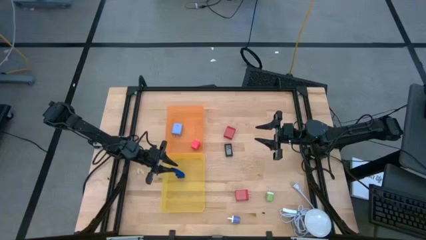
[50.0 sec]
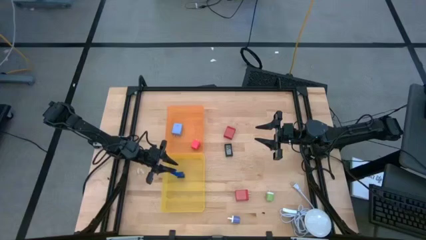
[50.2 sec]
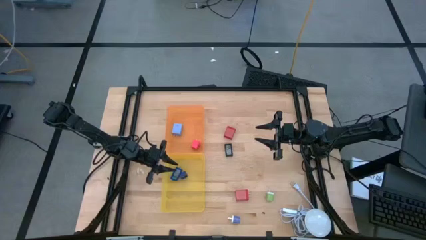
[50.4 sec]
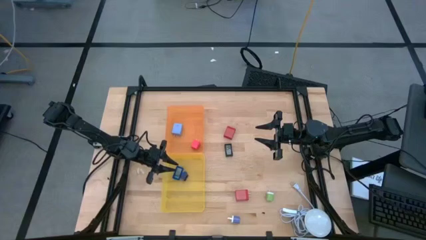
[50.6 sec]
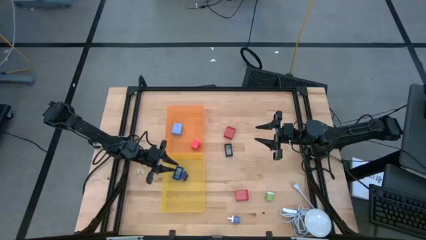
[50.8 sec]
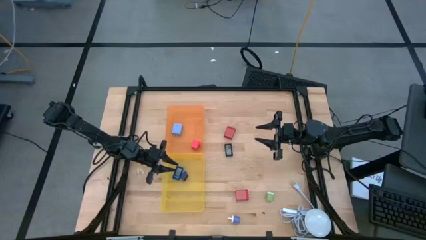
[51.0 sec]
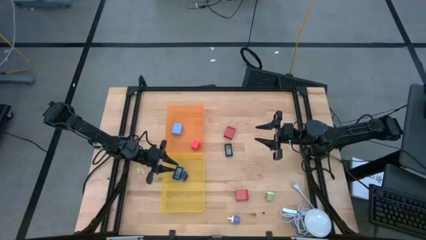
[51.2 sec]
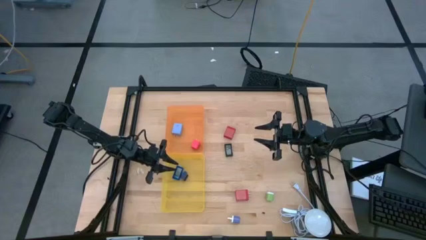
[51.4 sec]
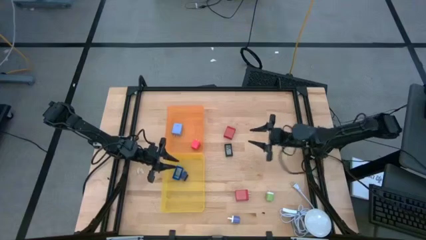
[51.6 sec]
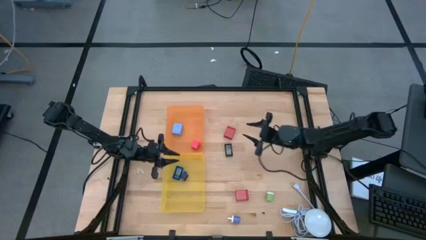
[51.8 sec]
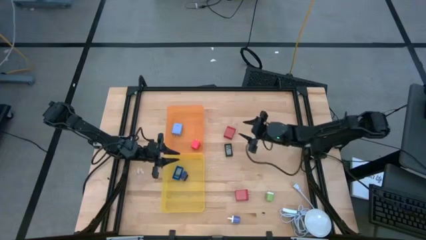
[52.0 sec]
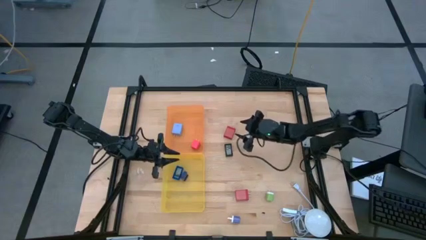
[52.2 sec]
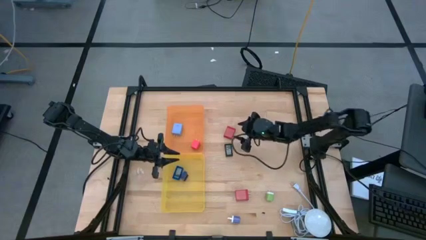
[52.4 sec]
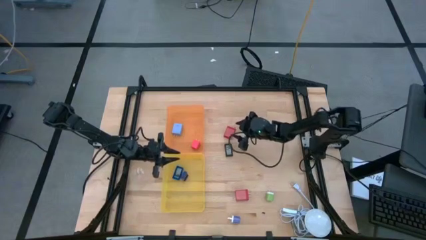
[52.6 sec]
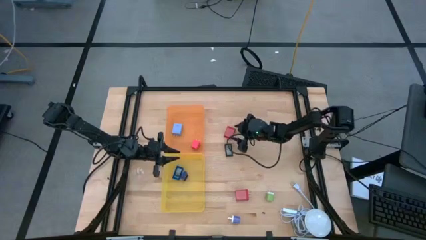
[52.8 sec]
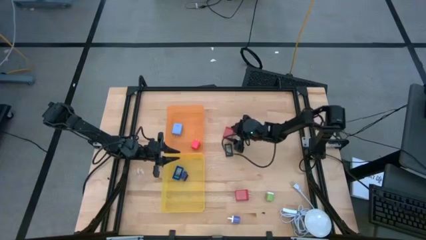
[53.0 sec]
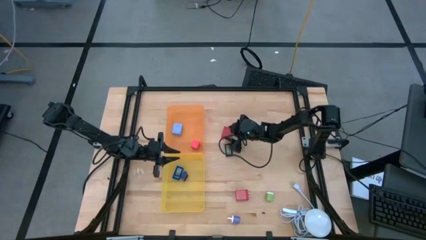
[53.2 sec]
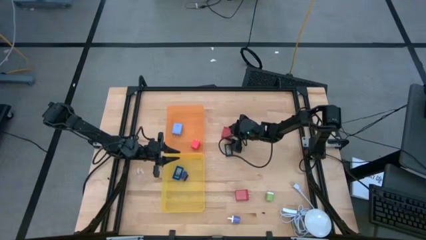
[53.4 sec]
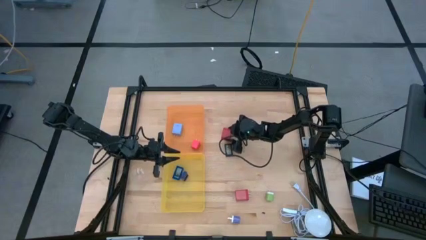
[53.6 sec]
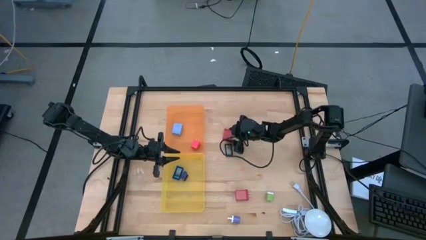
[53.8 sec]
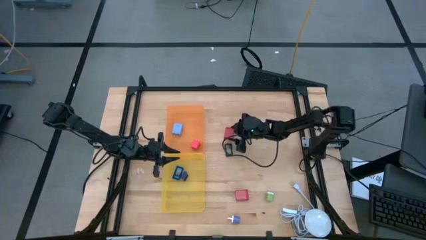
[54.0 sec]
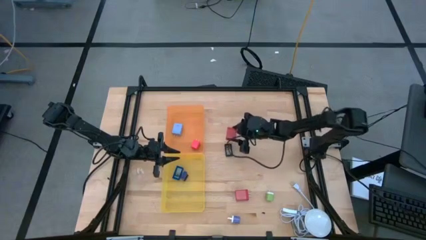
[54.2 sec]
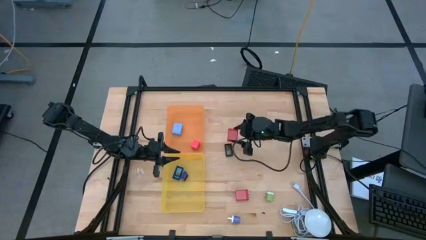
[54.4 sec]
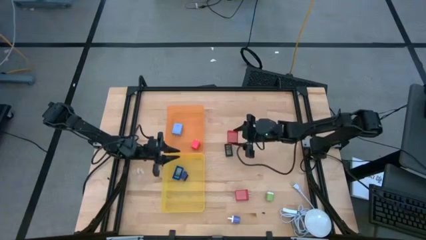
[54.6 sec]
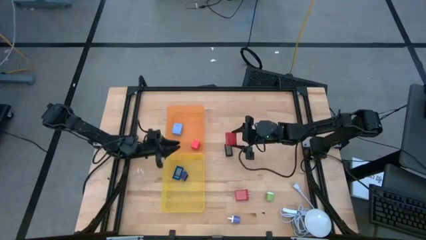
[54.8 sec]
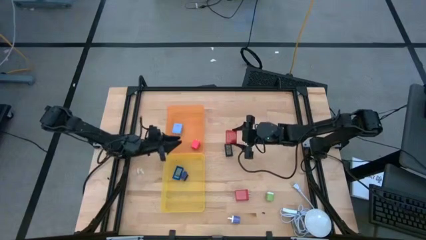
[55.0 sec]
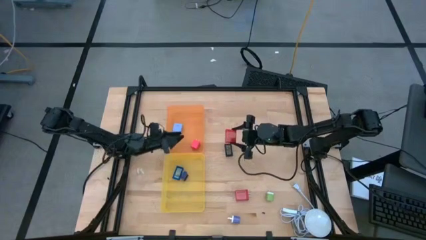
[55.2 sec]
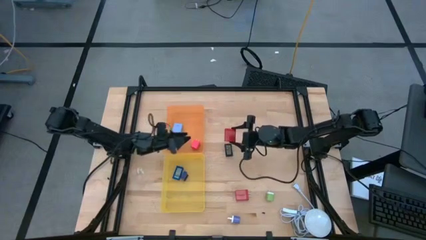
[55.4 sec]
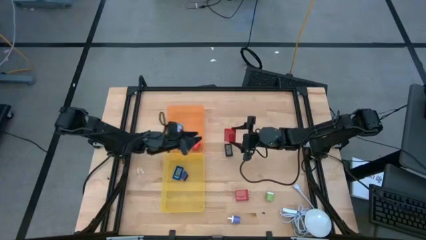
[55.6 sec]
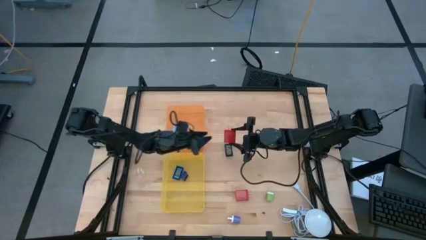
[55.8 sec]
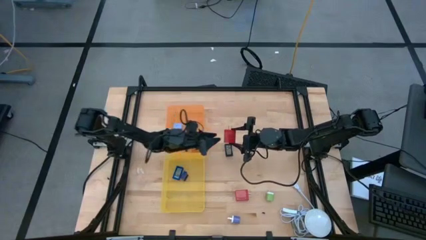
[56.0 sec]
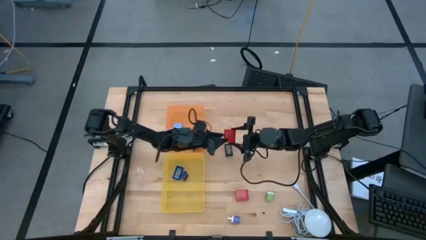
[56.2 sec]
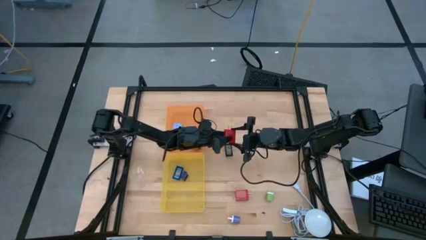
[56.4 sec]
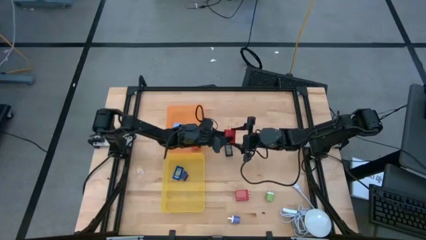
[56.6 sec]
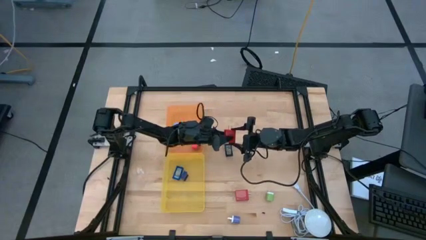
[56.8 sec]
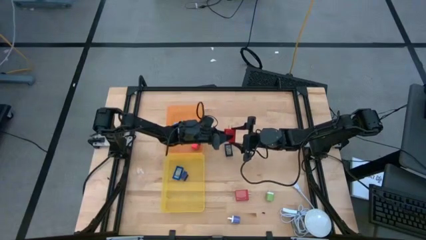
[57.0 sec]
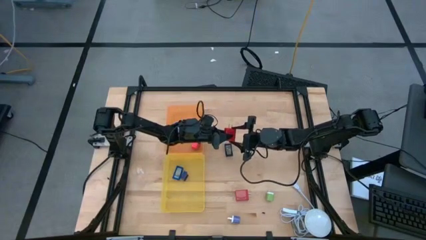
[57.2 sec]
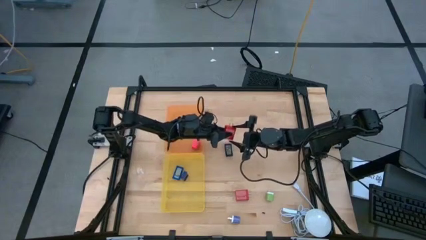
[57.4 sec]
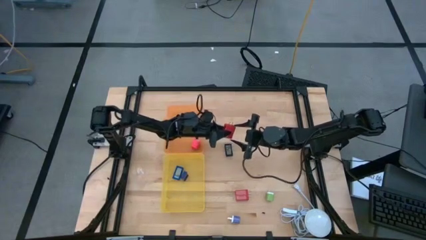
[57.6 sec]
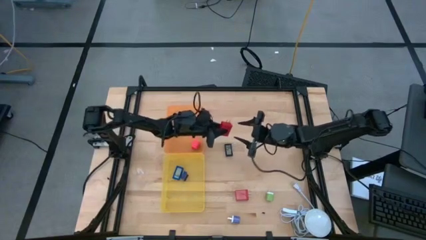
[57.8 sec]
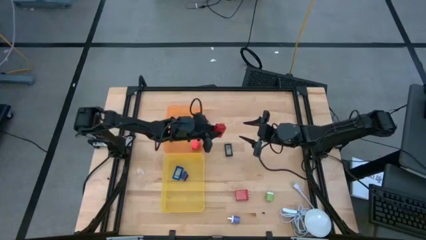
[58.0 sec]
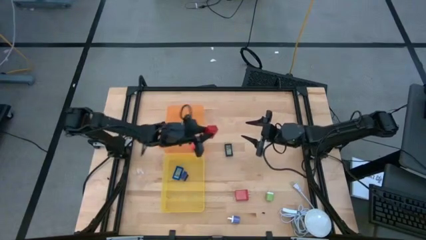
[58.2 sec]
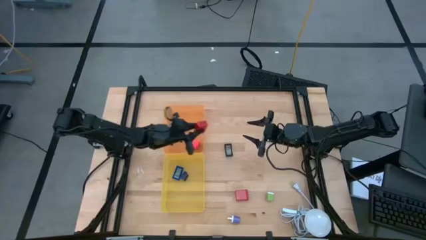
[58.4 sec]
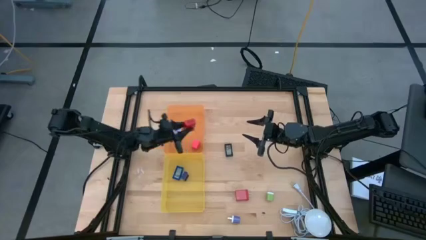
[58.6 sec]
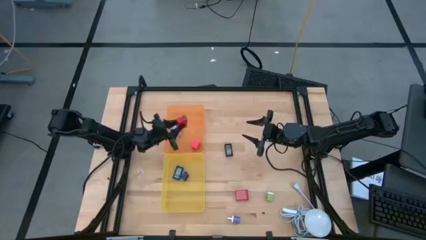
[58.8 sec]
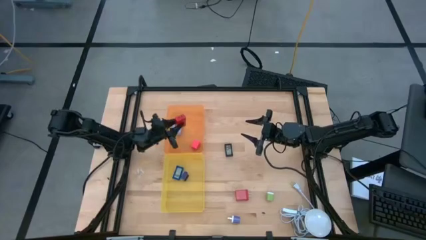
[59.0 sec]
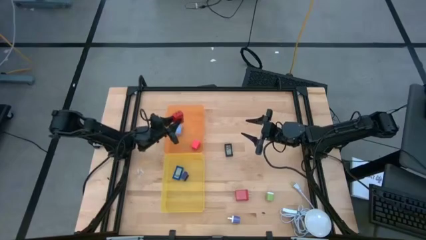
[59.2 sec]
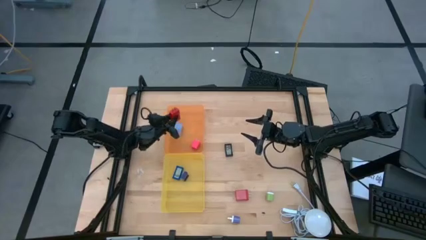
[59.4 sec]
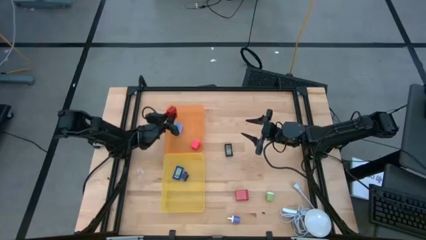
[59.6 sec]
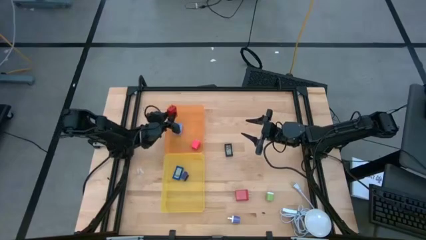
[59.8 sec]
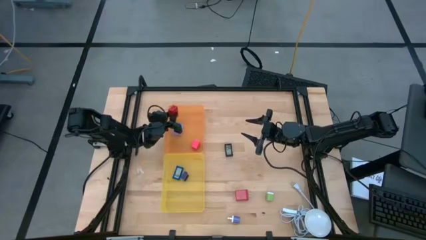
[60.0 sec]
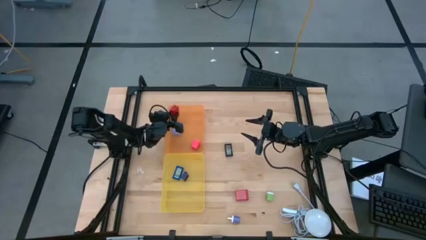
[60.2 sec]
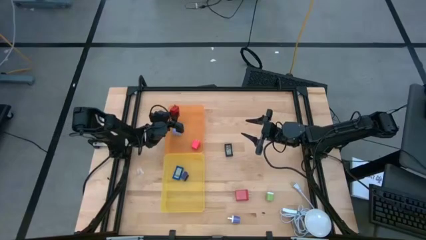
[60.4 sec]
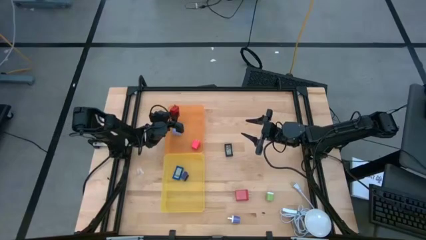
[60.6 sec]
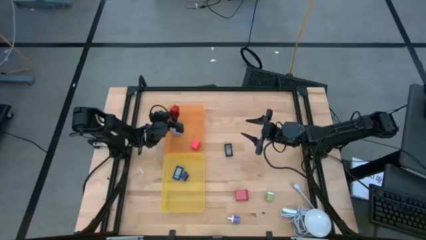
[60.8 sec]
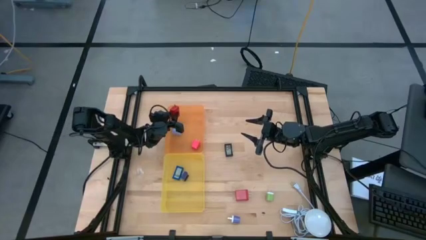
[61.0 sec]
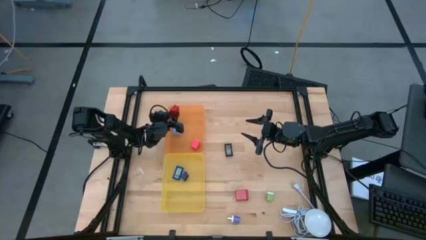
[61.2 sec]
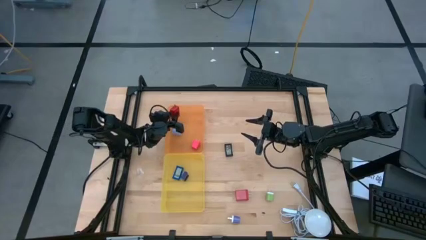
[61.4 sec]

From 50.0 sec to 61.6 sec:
Task: Sort adapters and digital timers
Put the top red adapter into the orange bin

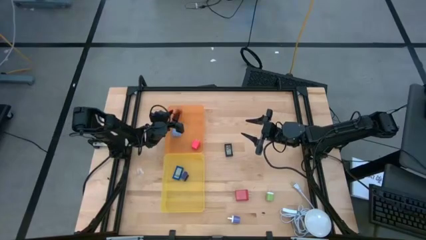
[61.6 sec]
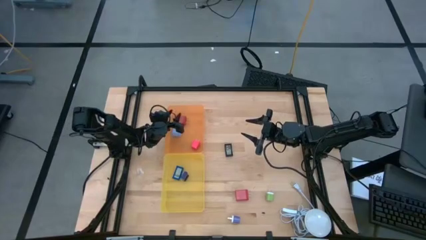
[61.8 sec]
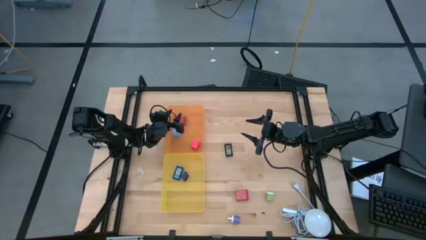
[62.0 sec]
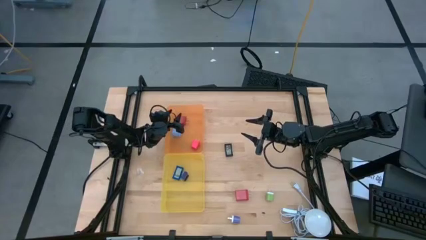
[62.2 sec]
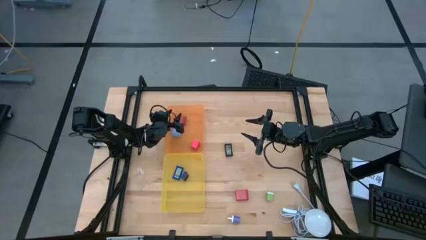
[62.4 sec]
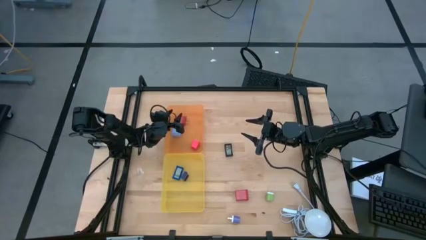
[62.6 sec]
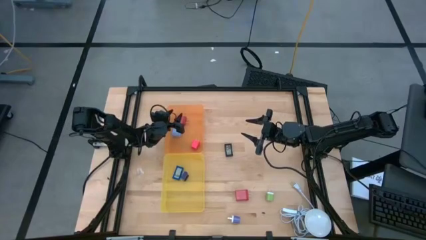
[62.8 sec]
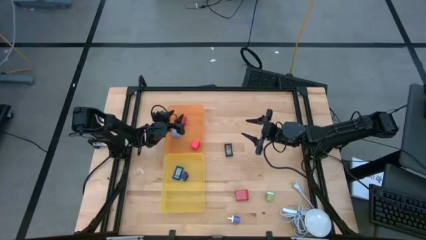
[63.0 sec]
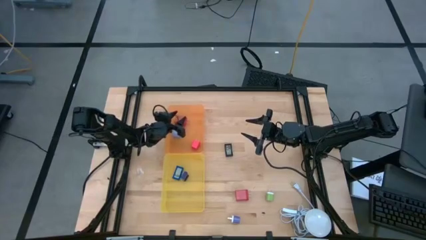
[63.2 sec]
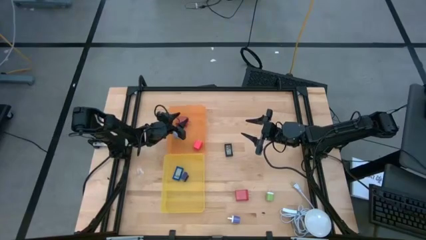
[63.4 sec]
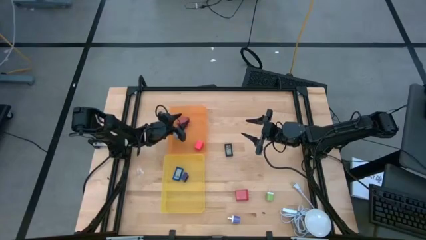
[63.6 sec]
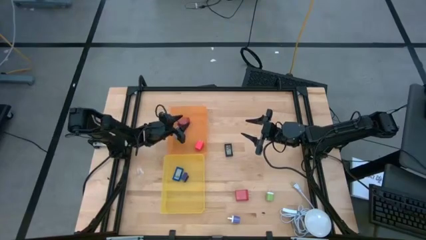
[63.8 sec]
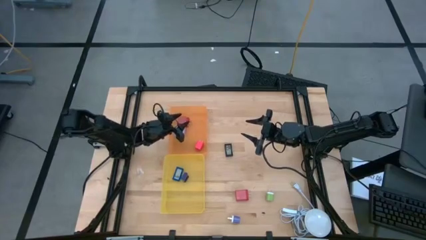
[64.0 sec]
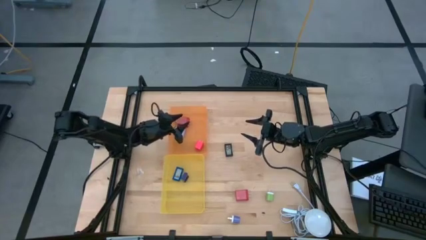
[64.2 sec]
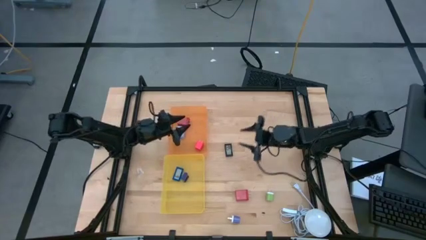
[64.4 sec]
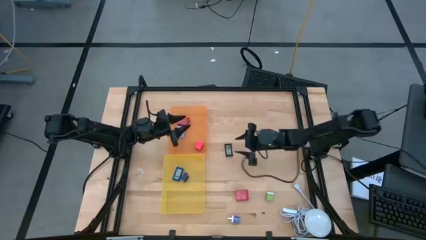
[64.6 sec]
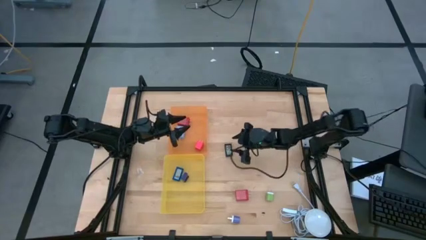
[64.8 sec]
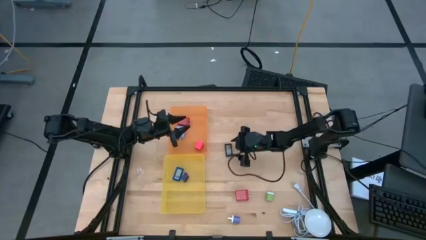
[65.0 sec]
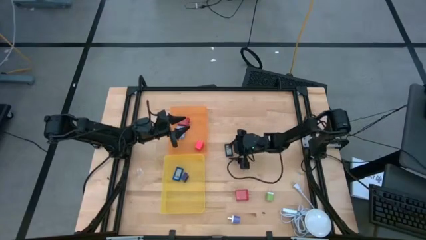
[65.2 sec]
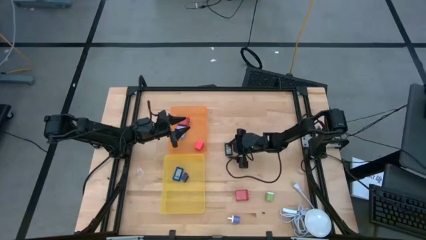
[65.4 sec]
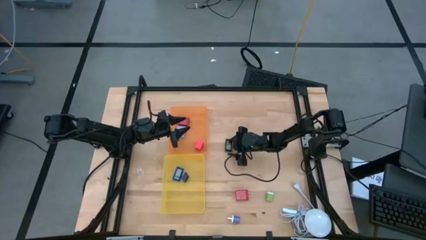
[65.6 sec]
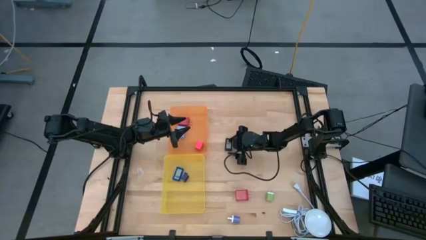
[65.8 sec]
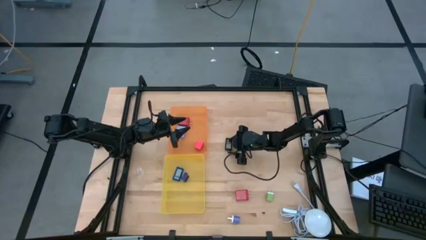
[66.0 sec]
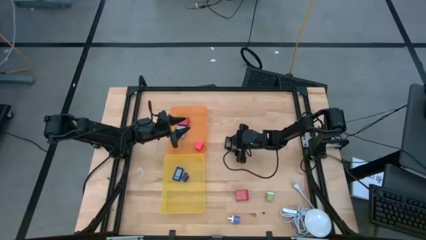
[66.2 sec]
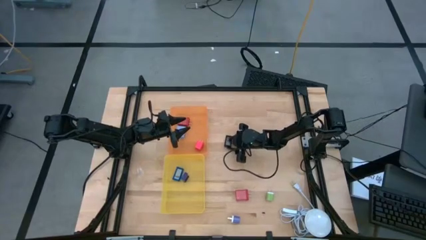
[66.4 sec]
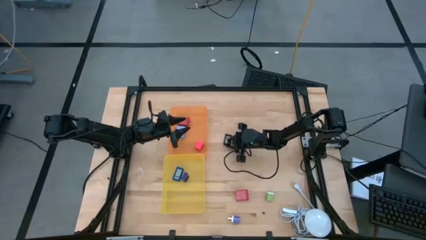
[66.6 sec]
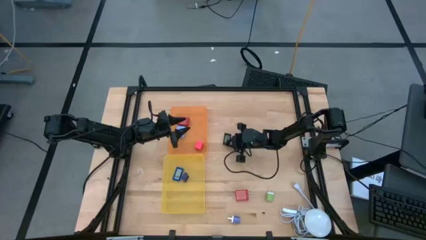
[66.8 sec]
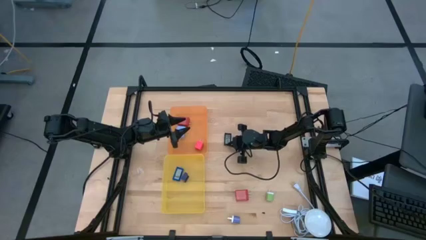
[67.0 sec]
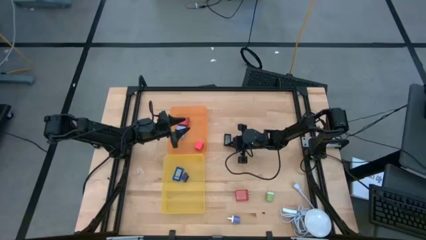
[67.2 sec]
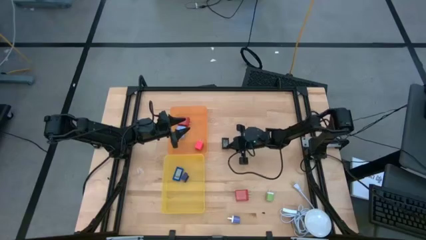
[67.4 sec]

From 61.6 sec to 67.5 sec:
Put the black digital timer into the yellow bin
